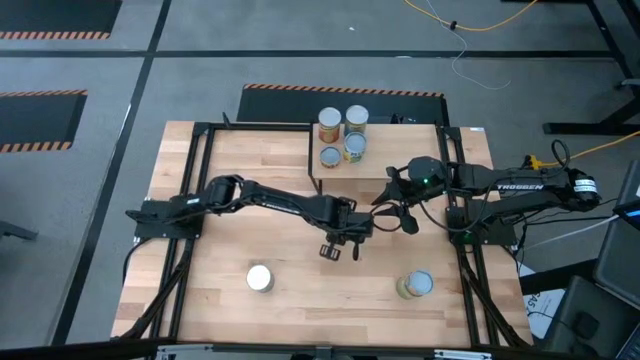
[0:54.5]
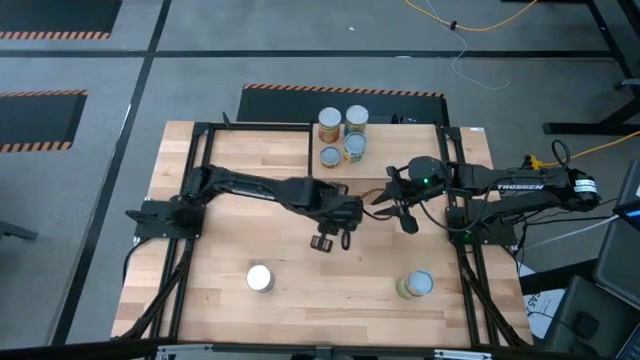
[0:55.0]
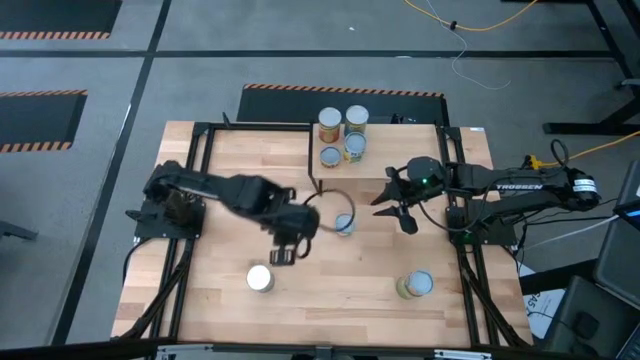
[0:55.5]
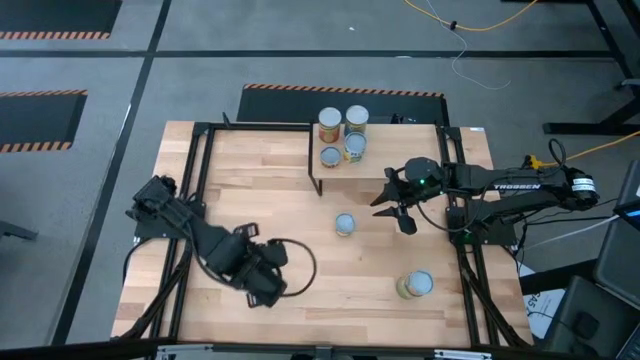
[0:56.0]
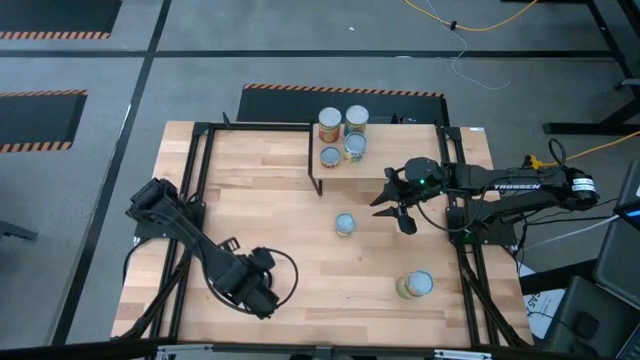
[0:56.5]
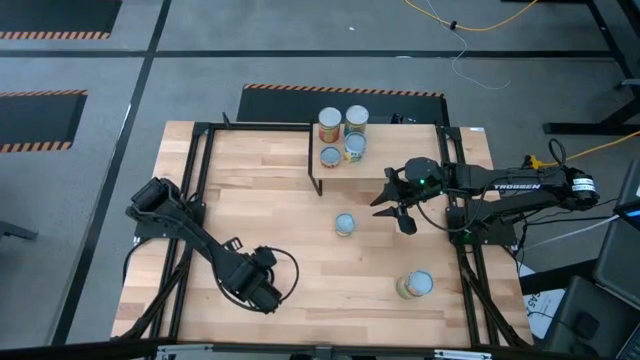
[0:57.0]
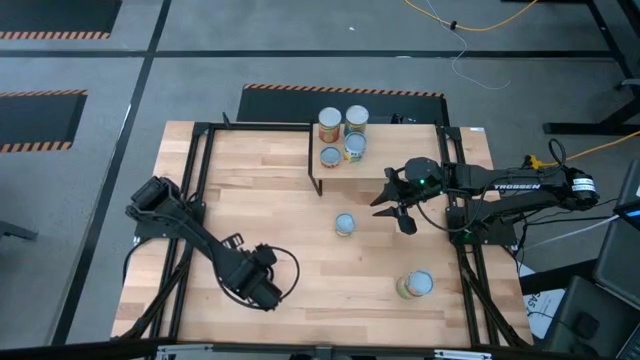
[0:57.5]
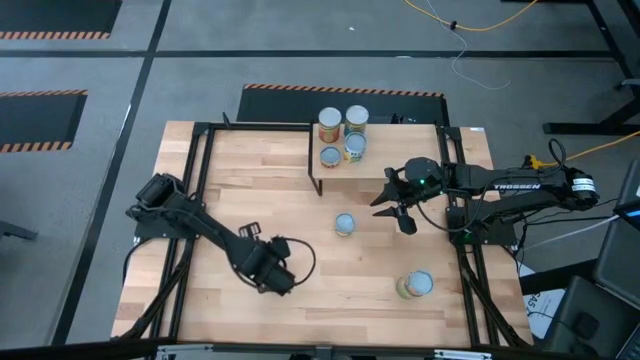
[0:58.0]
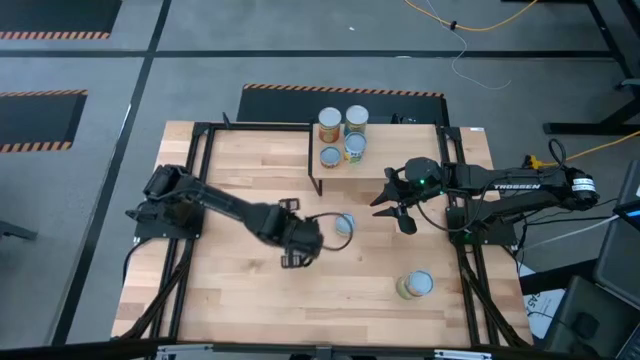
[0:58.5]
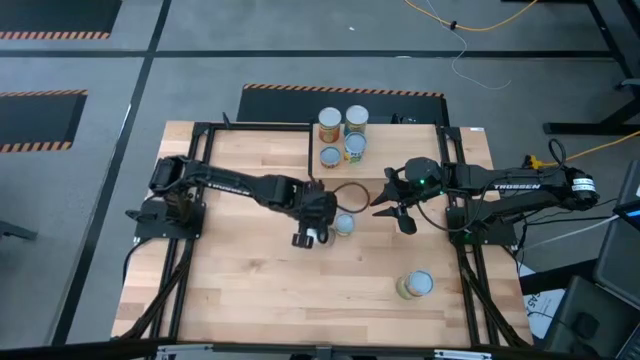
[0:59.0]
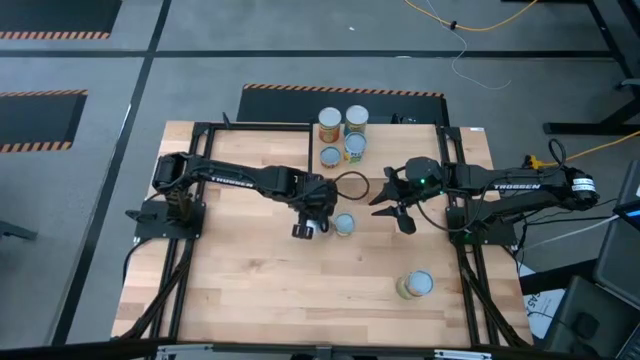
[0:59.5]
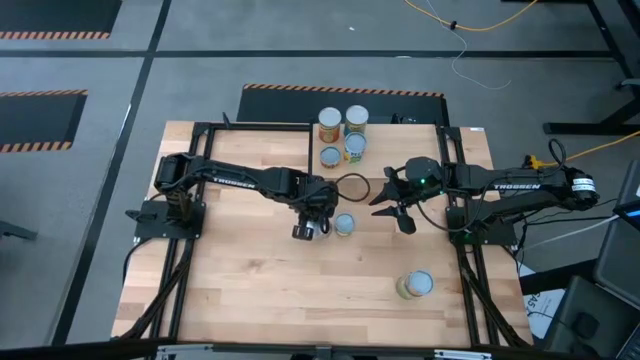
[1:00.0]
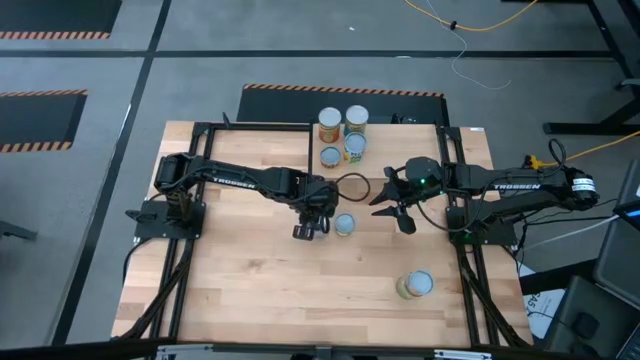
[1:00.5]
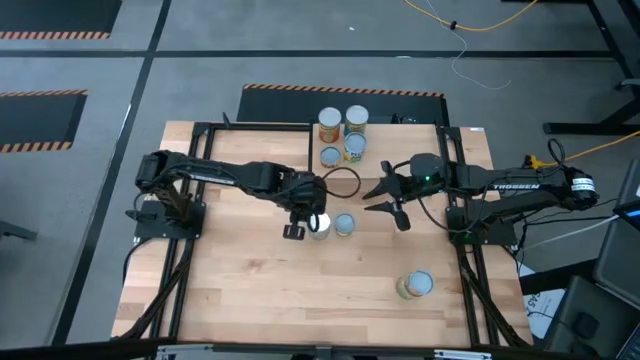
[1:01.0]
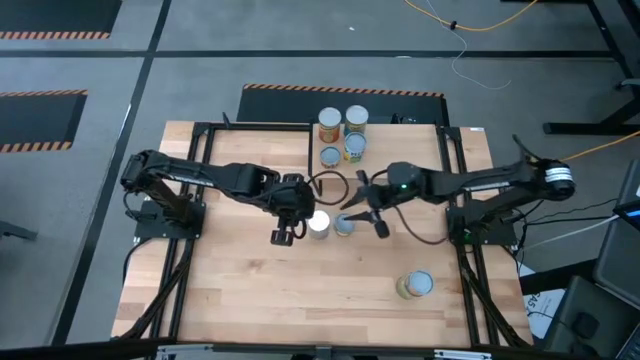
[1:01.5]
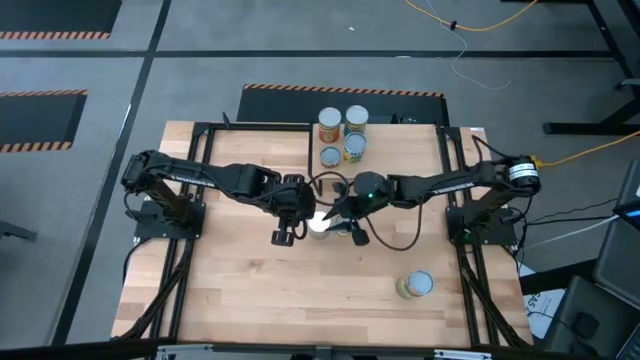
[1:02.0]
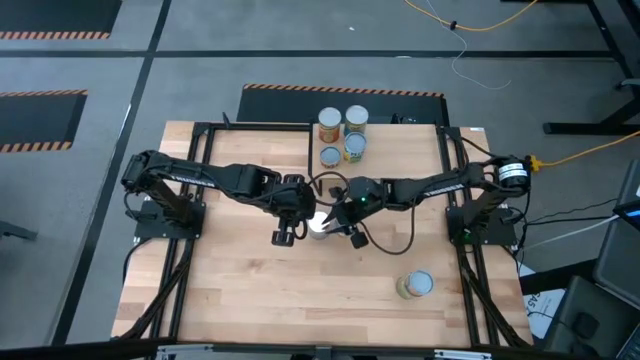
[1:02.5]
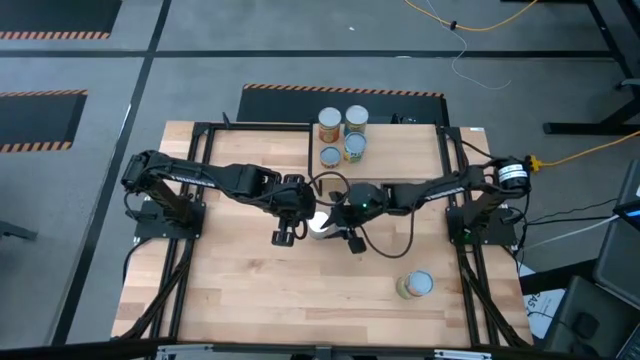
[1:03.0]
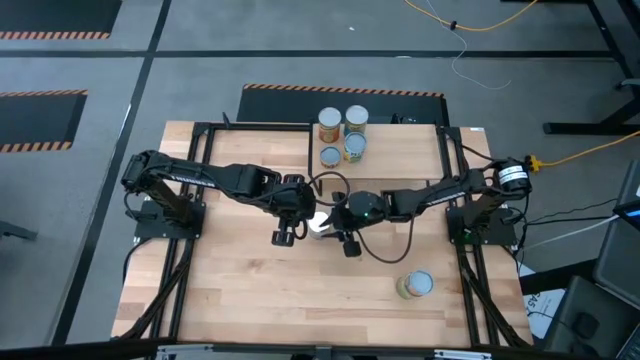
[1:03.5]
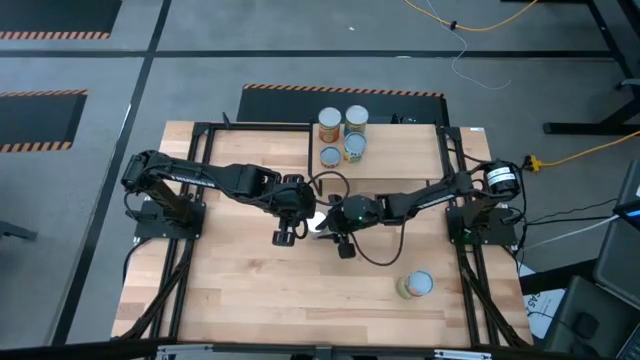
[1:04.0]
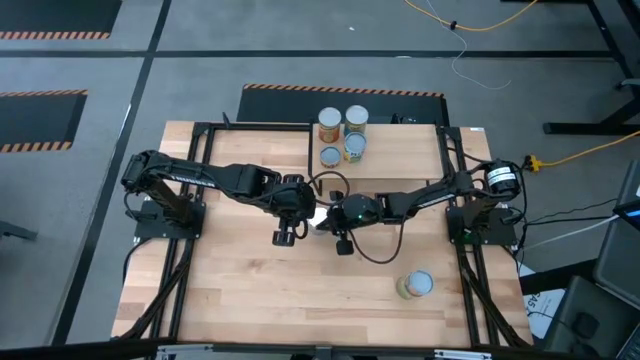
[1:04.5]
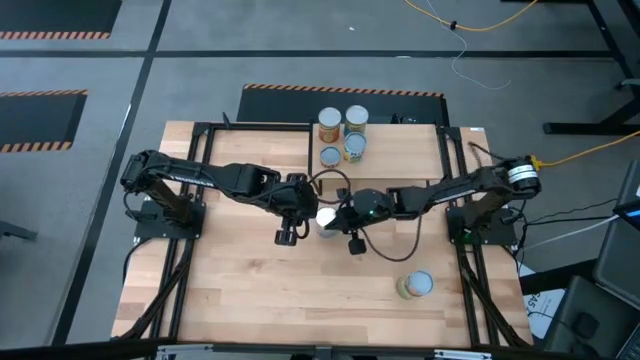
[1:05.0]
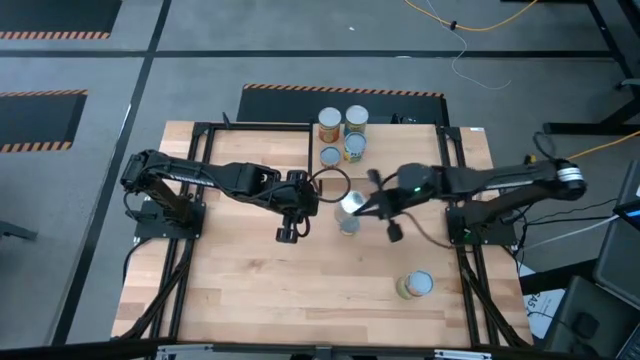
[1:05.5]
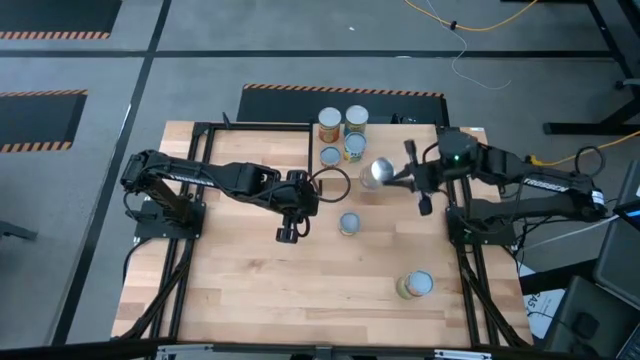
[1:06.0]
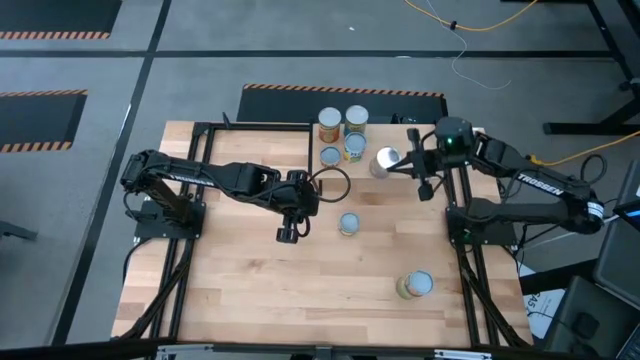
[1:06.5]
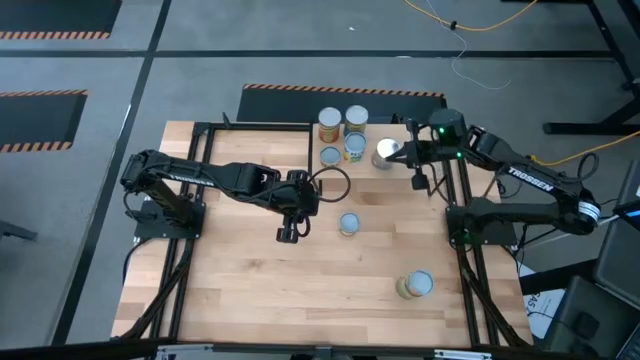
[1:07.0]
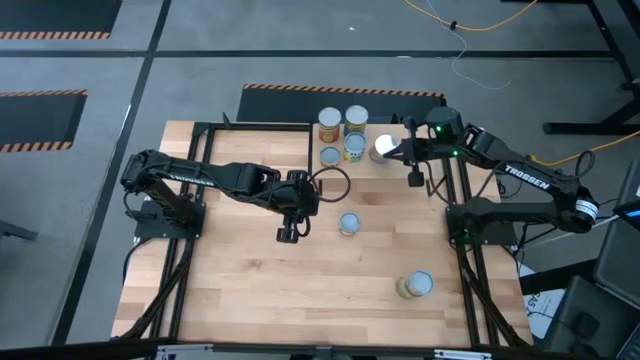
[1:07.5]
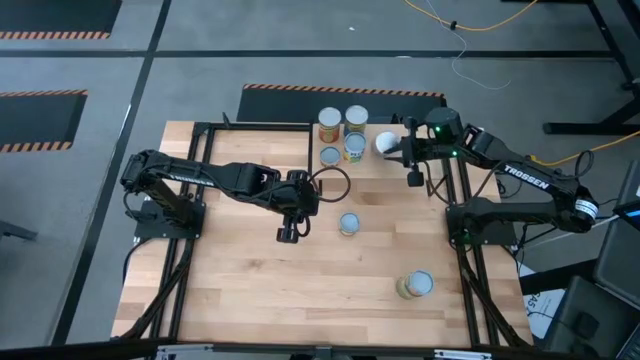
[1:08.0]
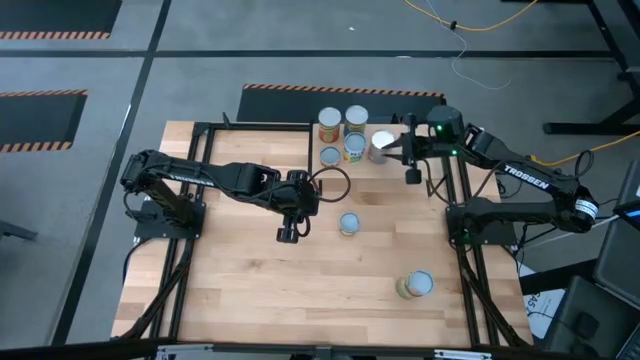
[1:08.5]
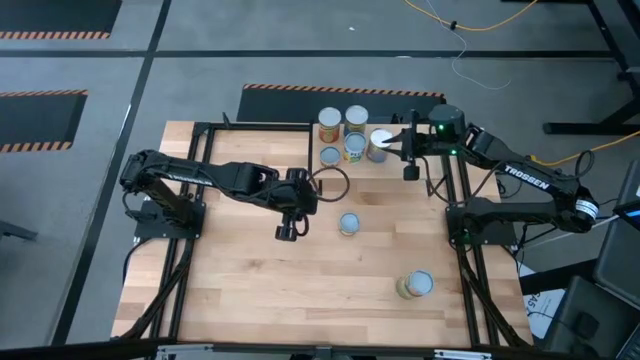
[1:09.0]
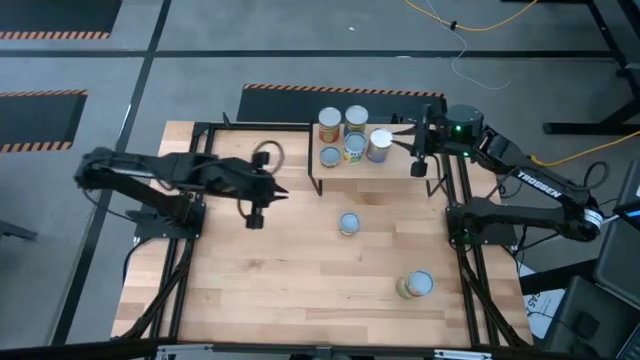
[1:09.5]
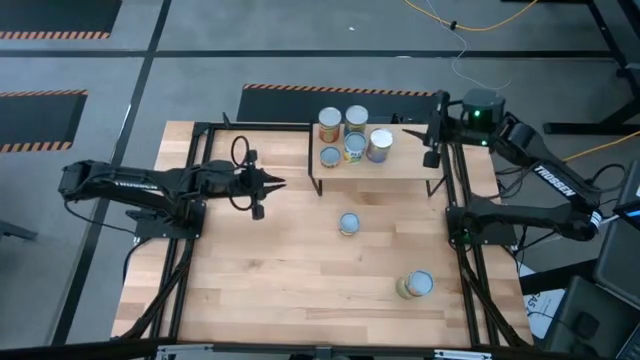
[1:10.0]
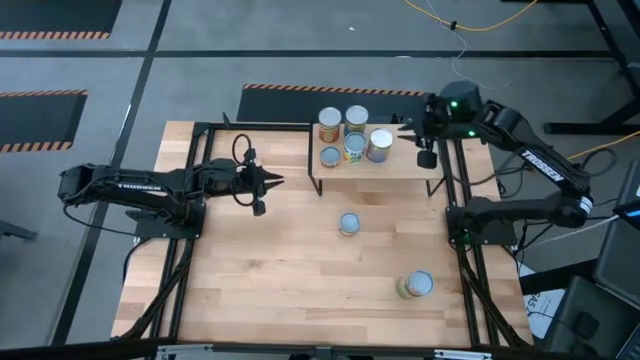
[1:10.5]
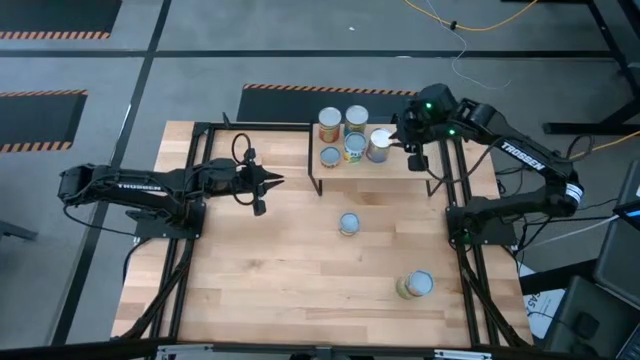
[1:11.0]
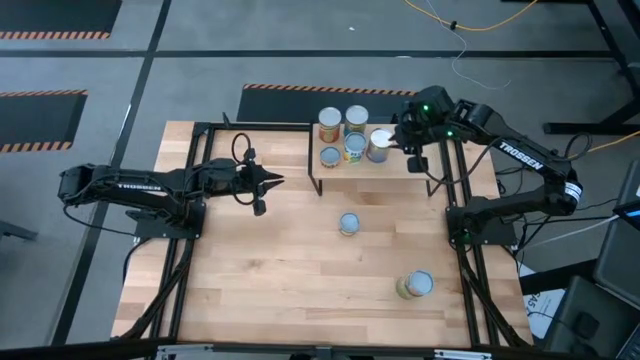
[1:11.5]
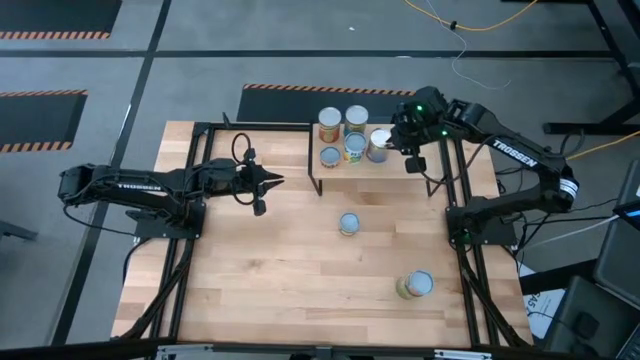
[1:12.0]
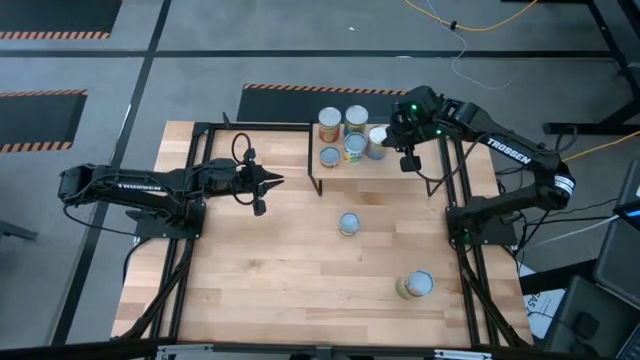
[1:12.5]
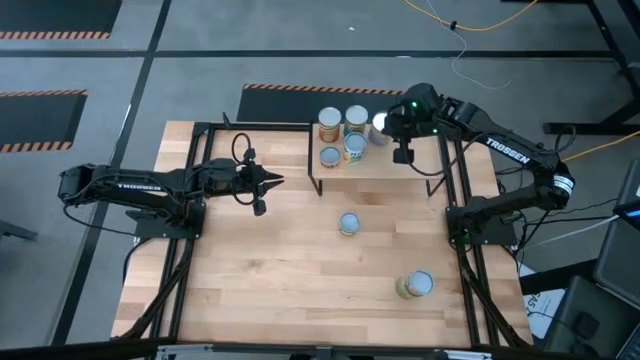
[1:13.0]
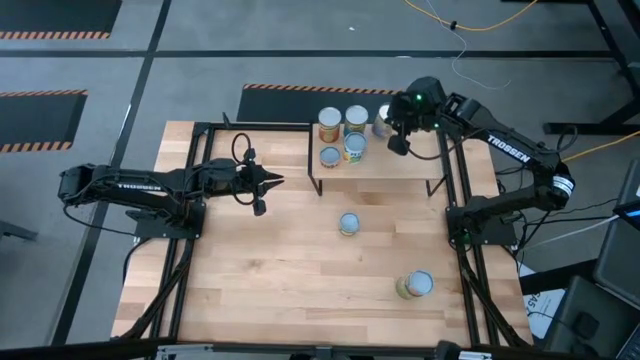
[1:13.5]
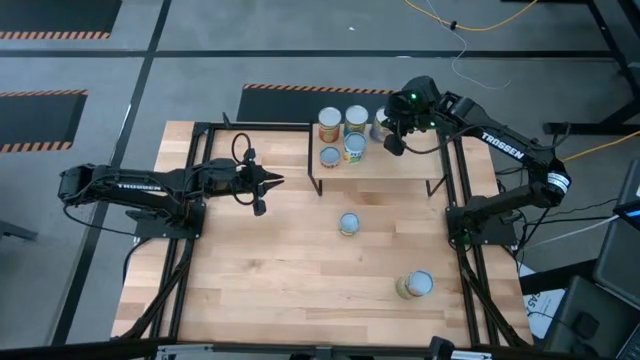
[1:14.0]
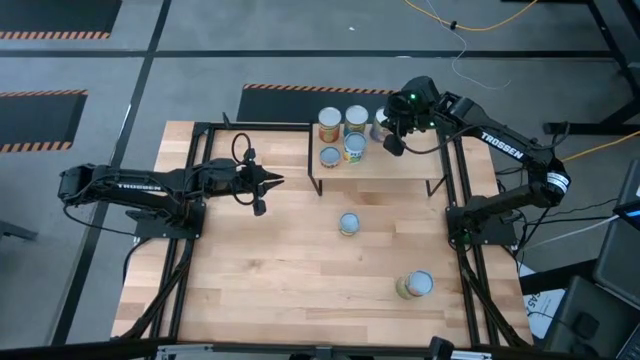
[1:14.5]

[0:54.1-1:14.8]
Task: Pick and place cans onto a shelf
Put the blue canned peaches on the shelf

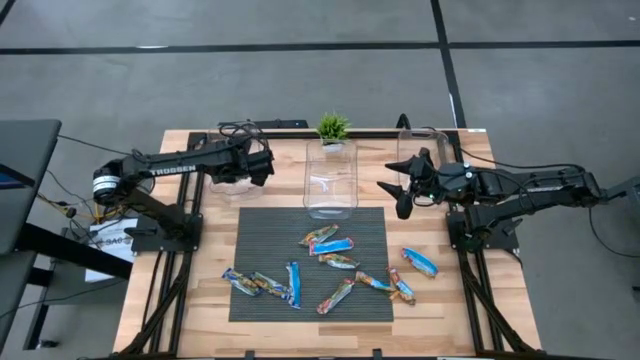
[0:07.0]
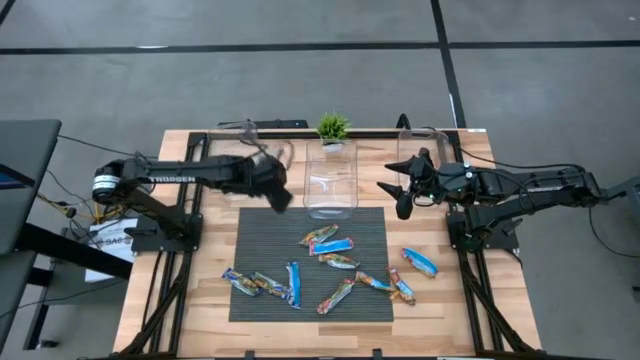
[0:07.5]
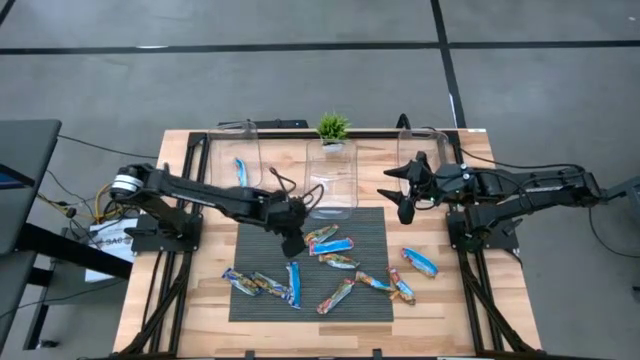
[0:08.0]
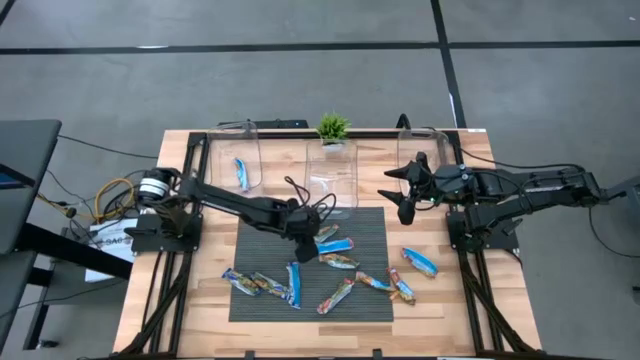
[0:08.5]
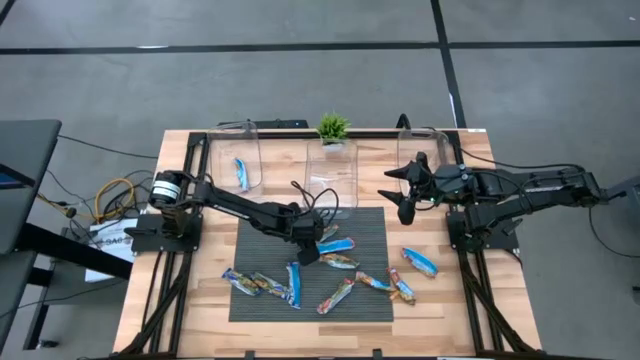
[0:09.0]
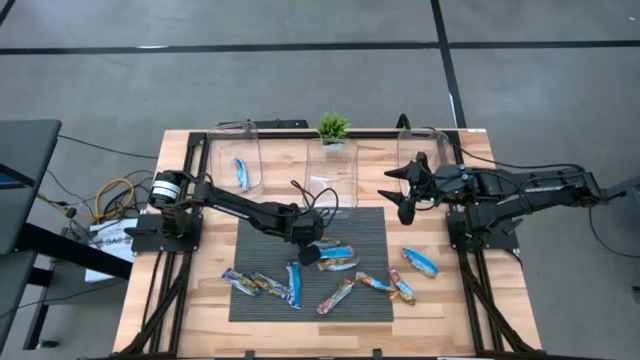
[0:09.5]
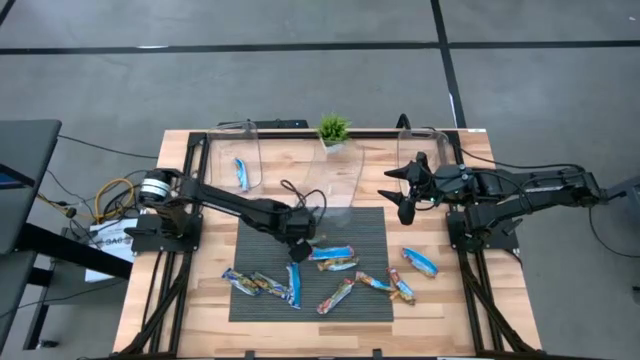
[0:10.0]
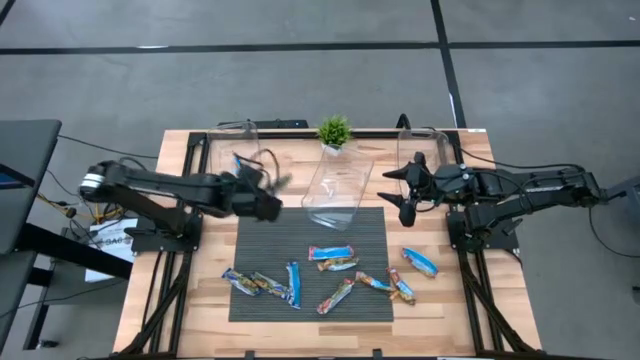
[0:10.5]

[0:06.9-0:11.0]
Task: Pick and place Granola Bars by type
Put the yellow granola bar into the left transparent bin
